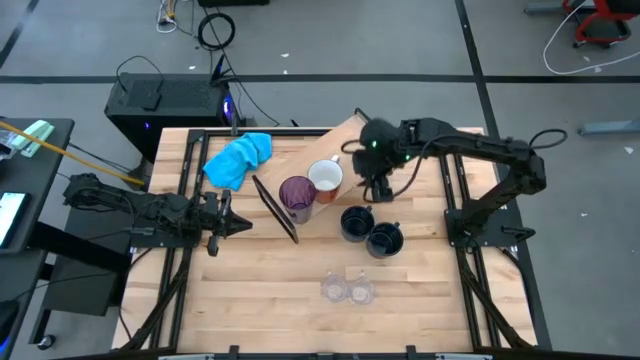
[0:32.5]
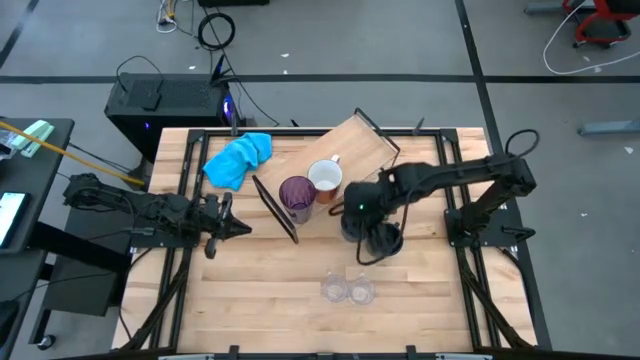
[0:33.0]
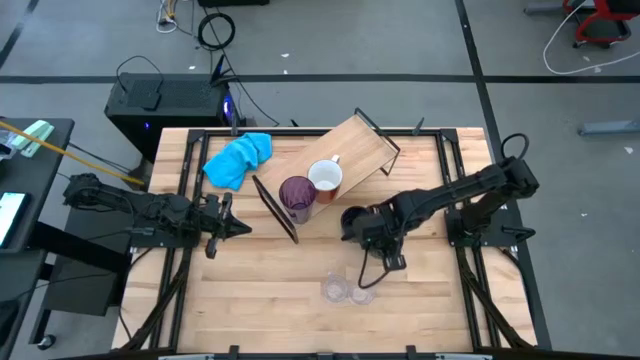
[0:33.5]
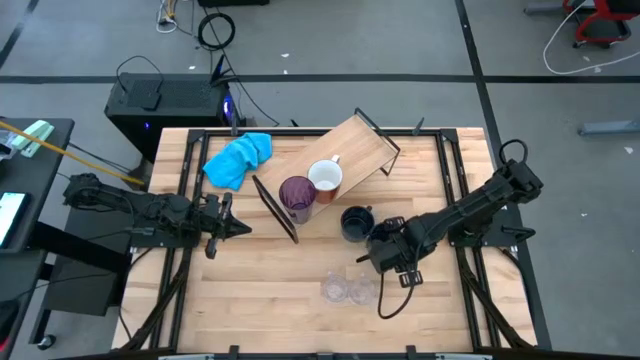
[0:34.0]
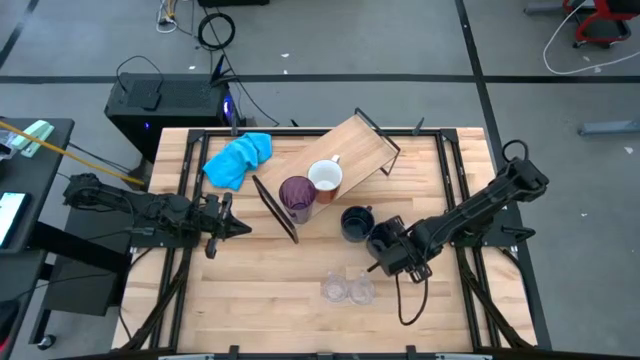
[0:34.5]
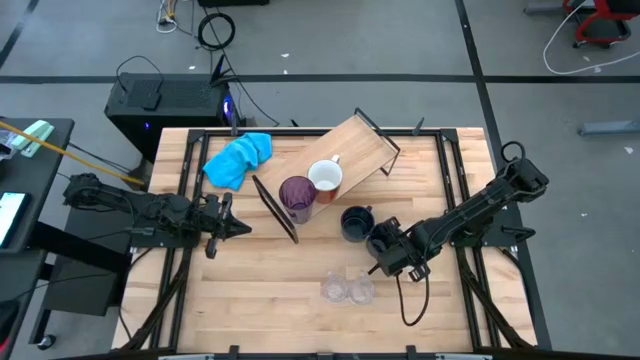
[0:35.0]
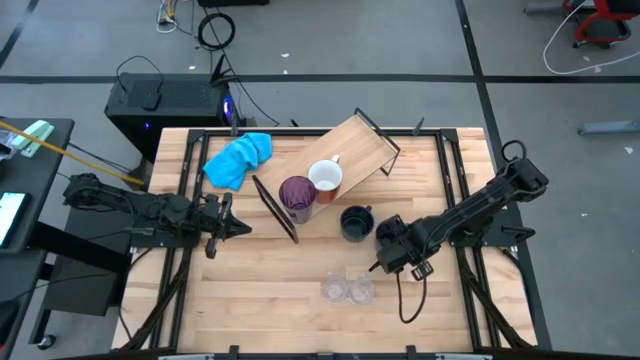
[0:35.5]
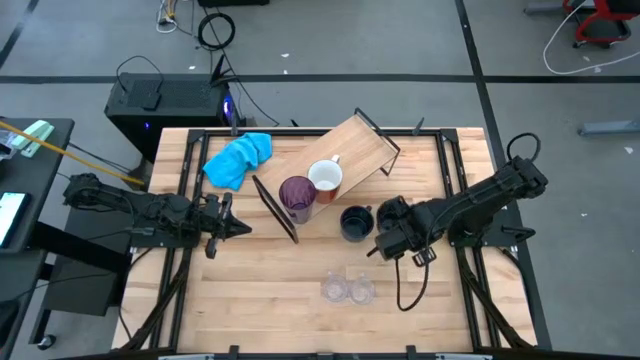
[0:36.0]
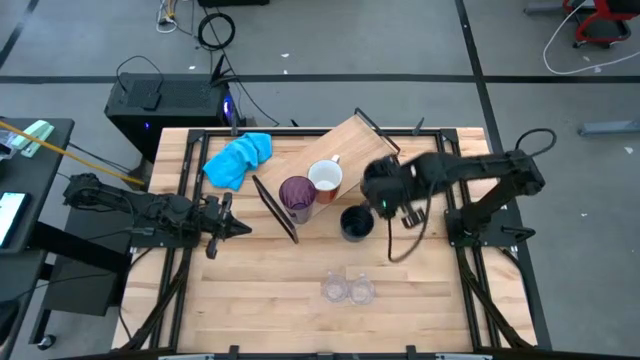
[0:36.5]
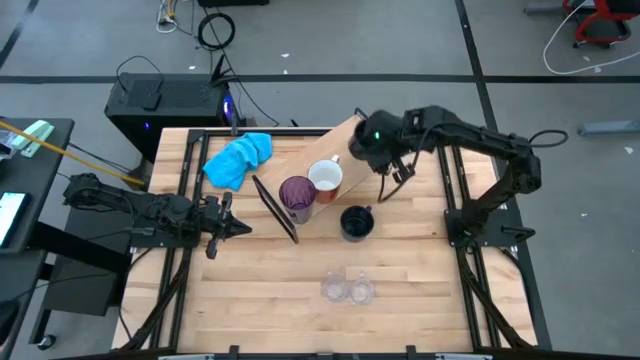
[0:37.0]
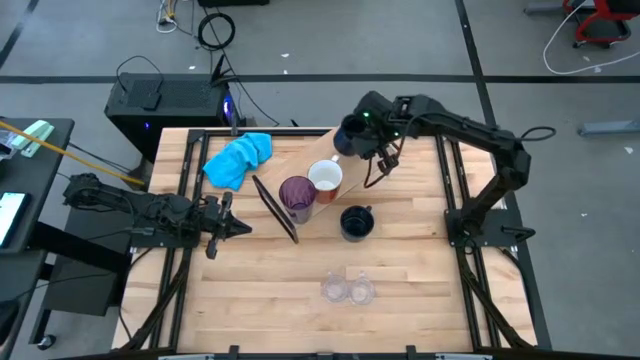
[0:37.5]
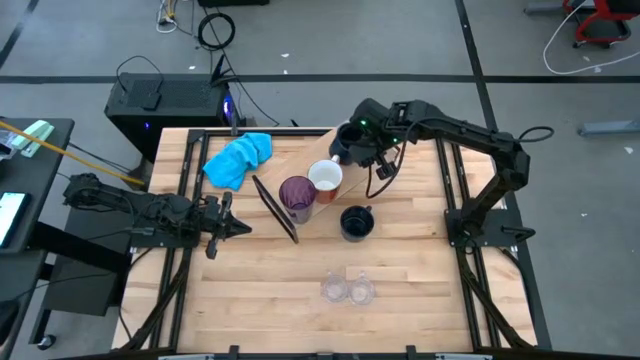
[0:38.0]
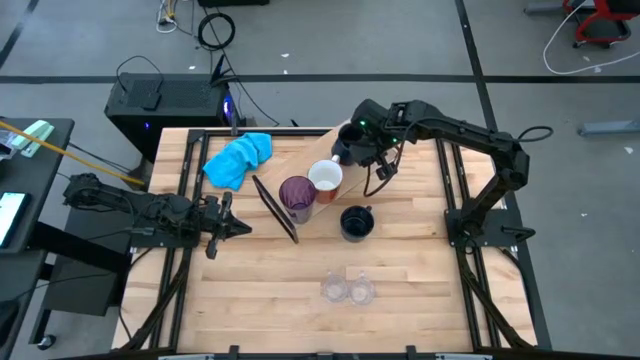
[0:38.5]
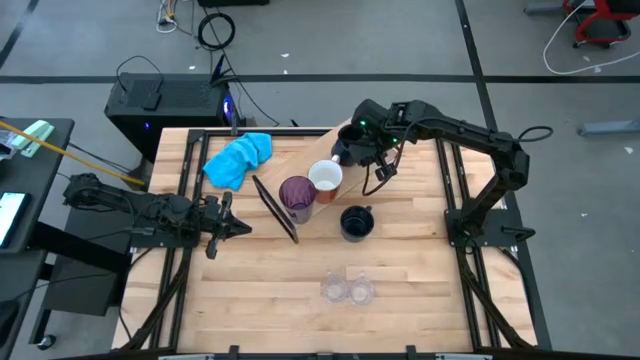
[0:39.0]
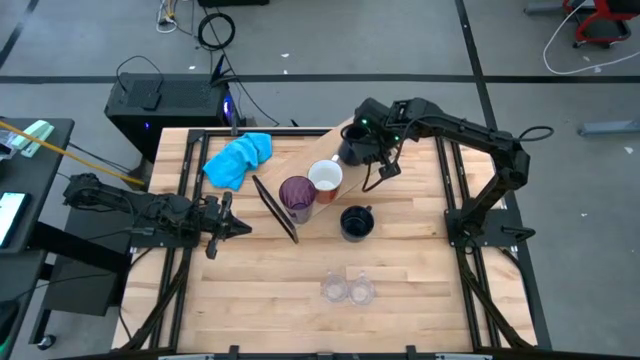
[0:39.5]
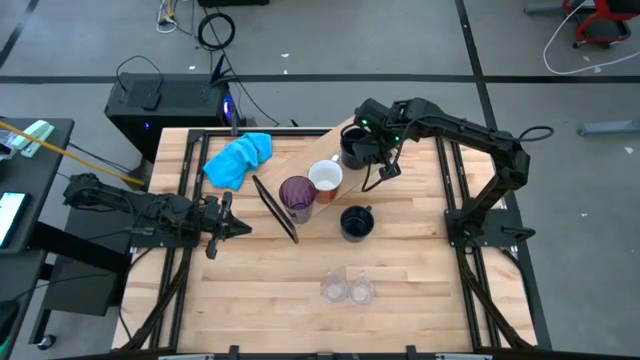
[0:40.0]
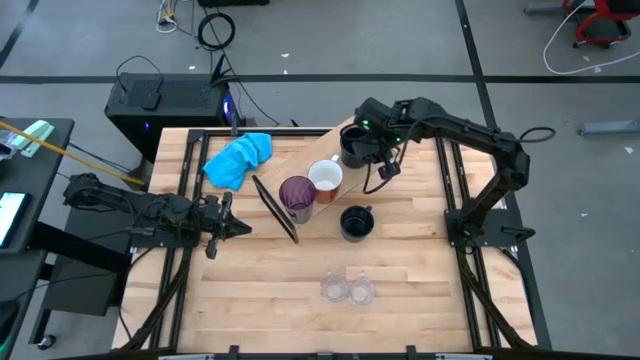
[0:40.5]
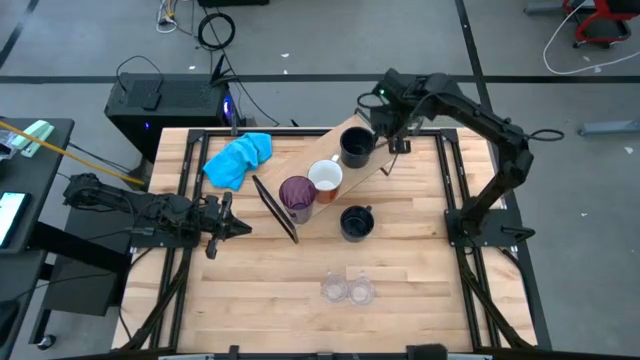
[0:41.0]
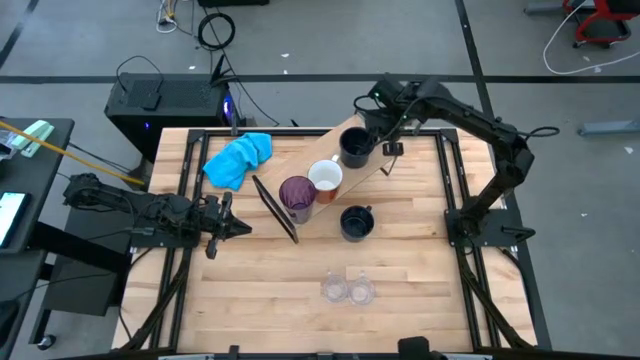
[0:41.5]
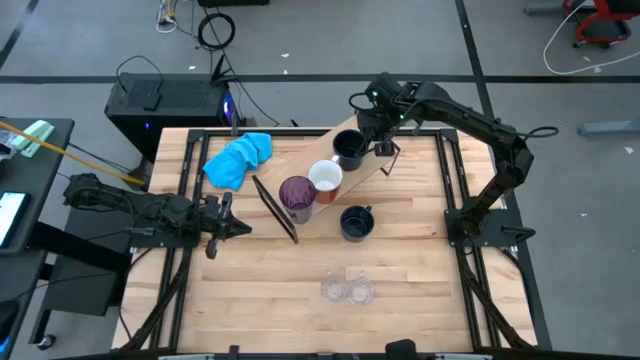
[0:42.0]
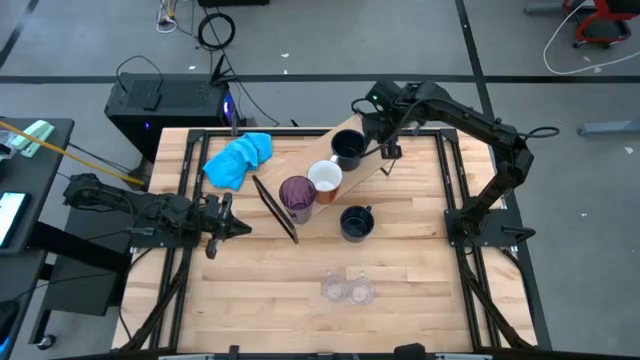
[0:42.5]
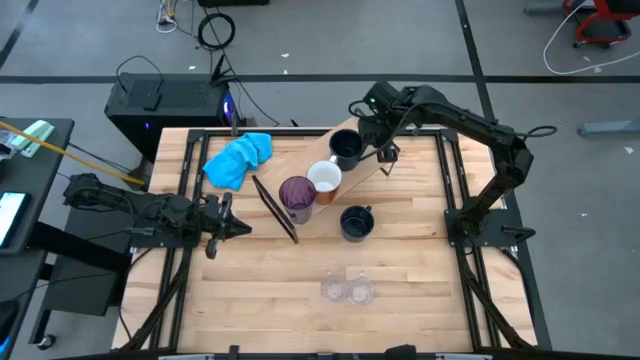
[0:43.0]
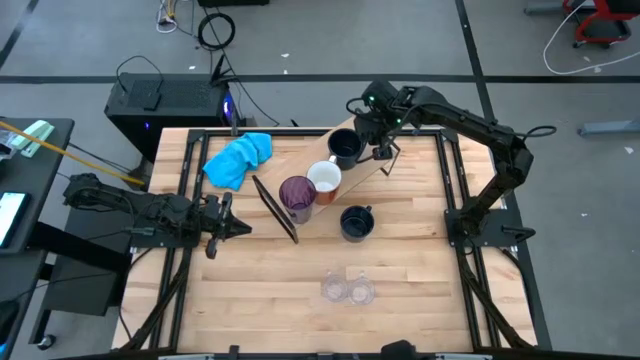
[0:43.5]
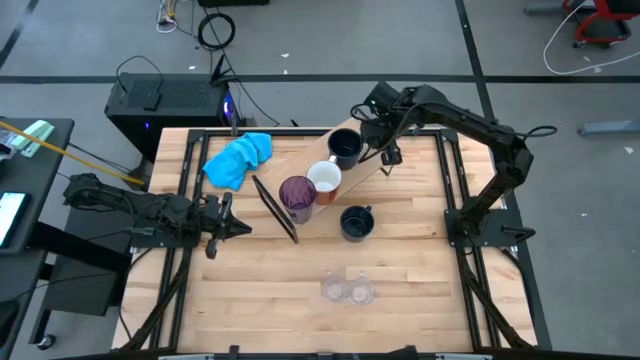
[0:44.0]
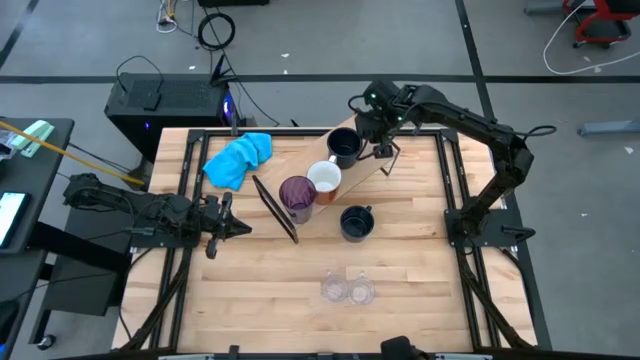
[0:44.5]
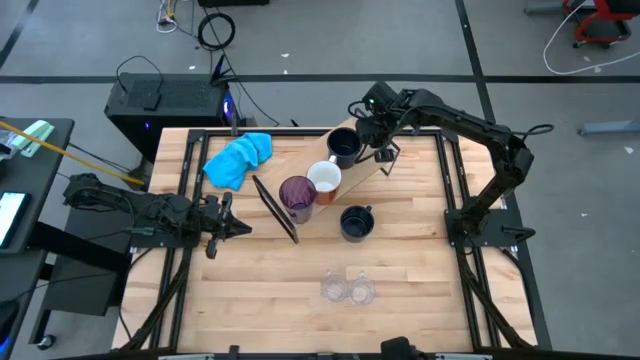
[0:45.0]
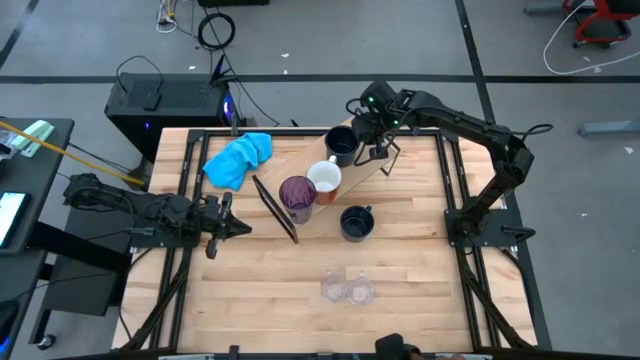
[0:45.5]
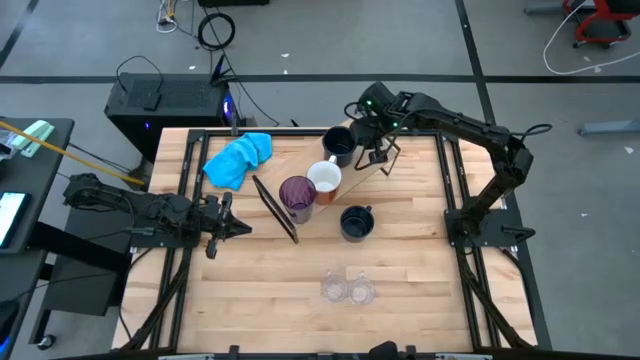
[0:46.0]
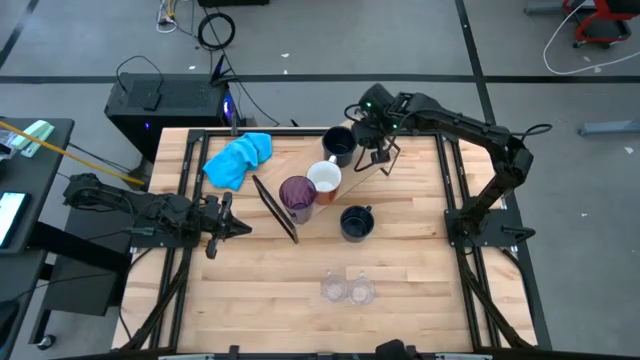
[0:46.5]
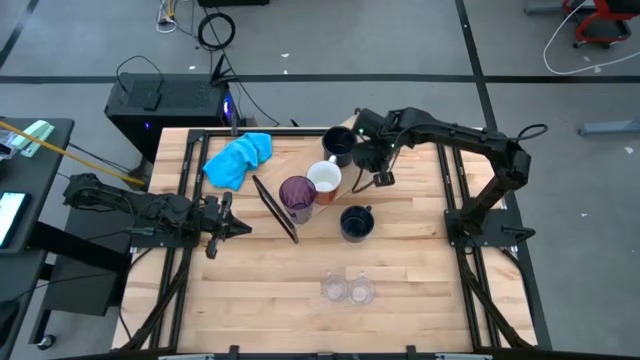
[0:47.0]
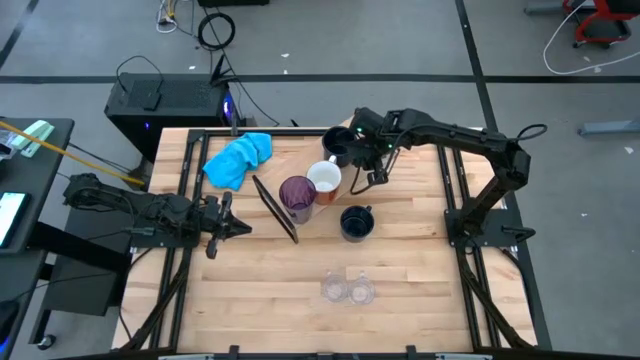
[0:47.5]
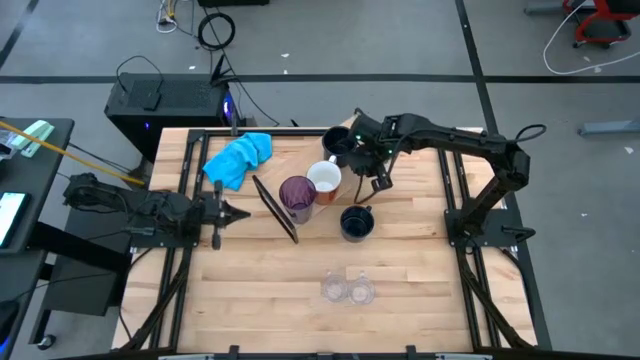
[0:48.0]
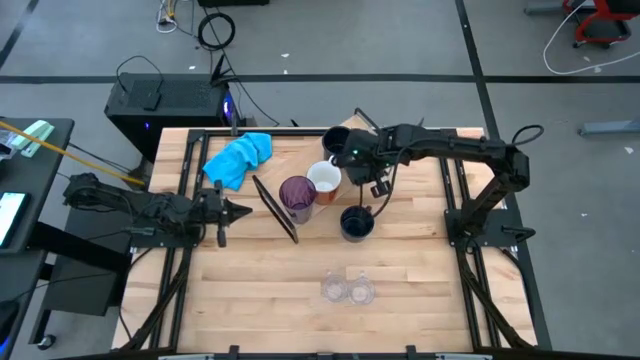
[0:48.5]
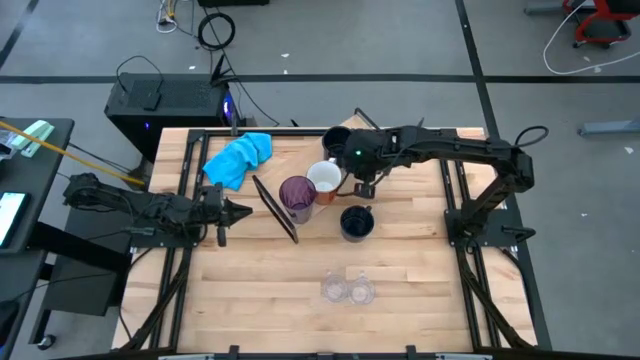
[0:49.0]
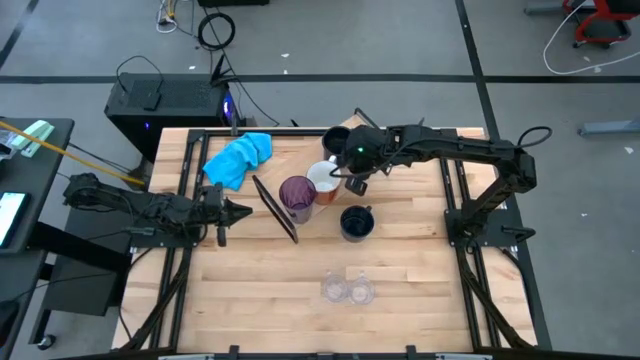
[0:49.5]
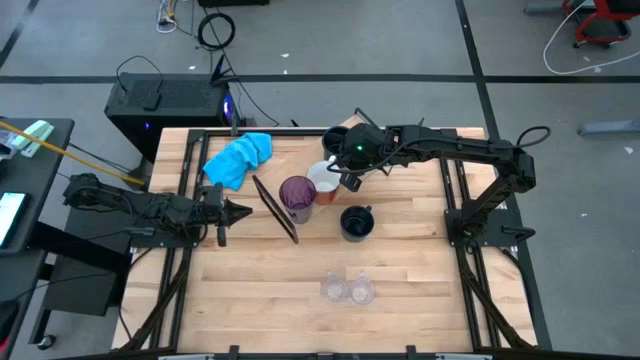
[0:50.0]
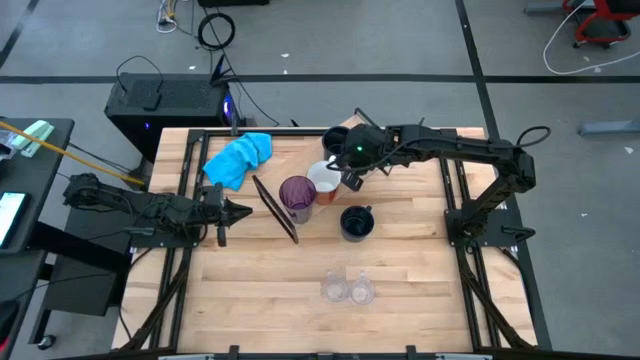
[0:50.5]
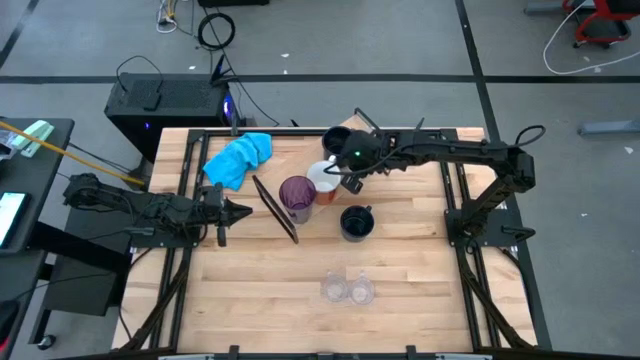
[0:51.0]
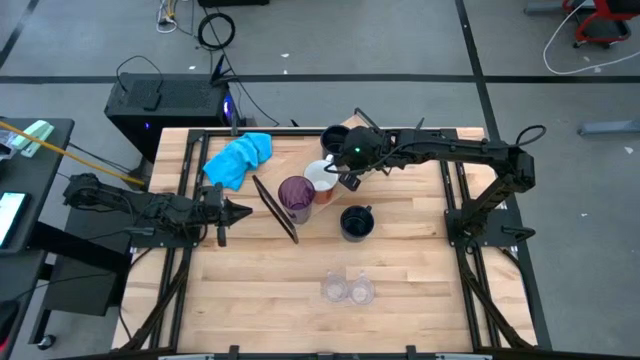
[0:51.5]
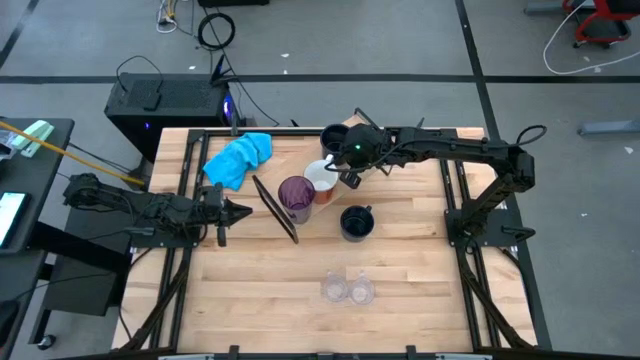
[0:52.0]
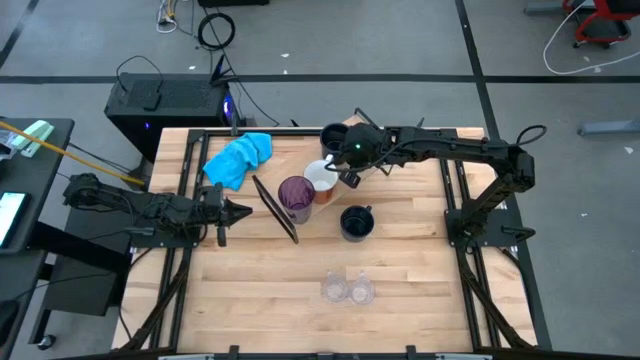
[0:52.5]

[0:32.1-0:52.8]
Task: Stack small to large cups/mugs on shelf
Put the right dark blue mug on the shelf

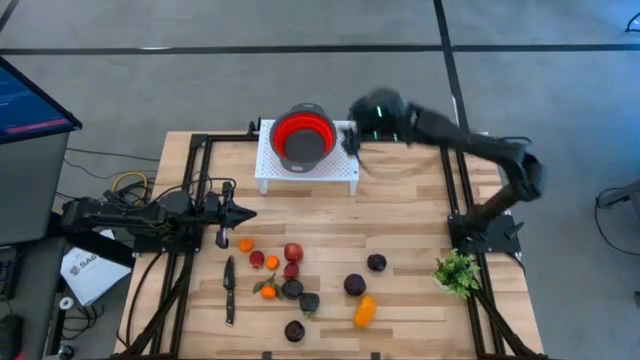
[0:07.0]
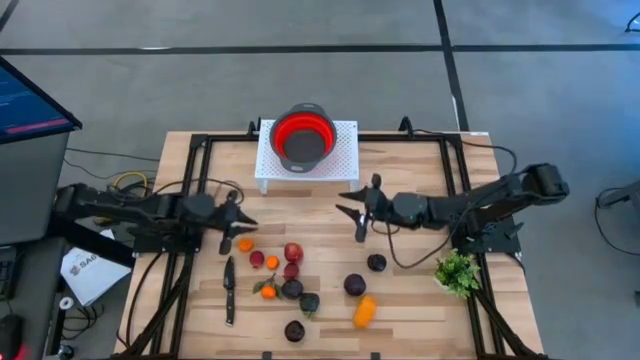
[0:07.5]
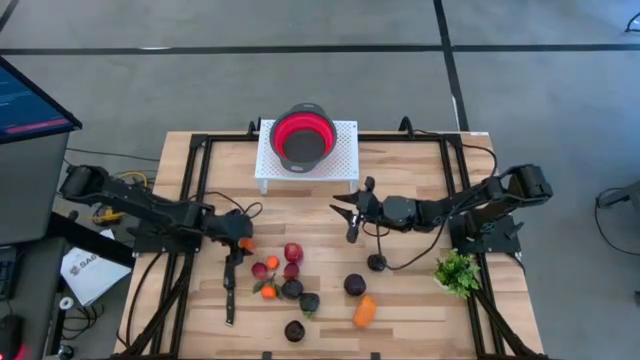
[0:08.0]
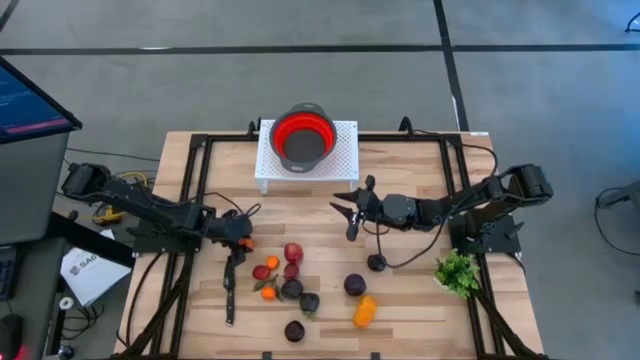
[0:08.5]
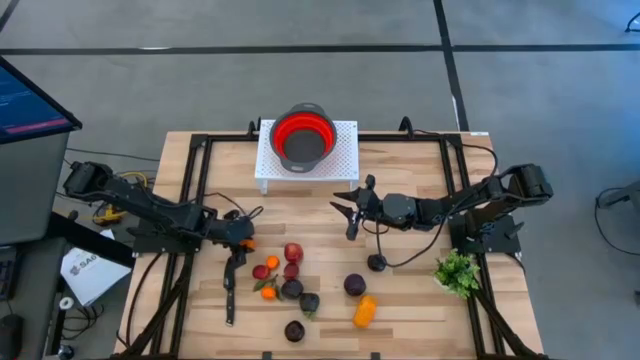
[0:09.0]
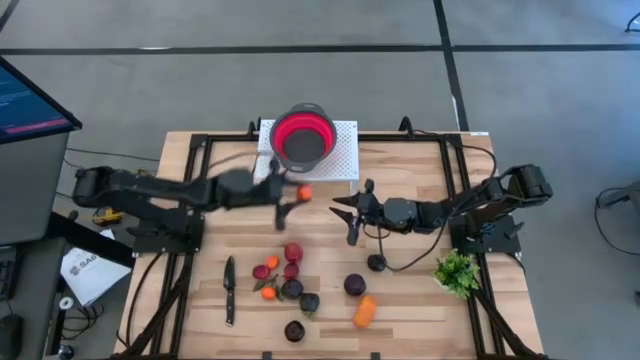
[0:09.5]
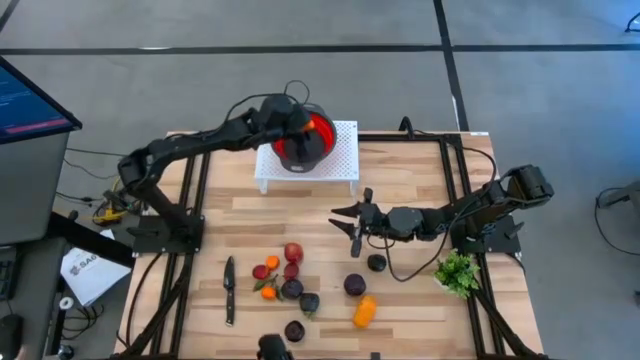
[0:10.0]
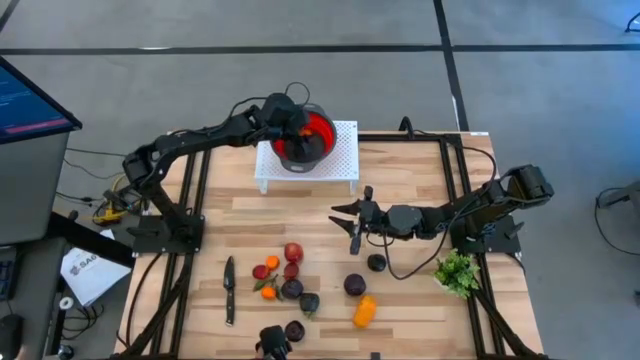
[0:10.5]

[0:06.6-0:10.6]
Task: Pick & Place Fruit
Put the orange into the red strainer bowl
